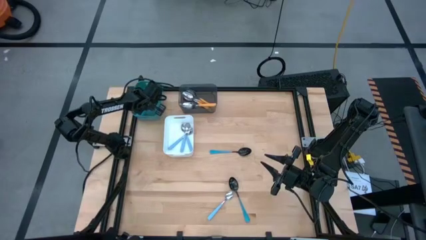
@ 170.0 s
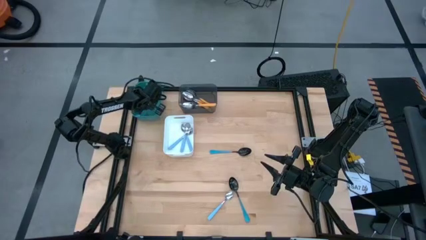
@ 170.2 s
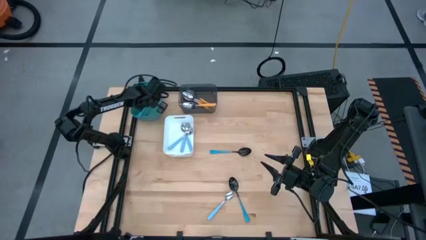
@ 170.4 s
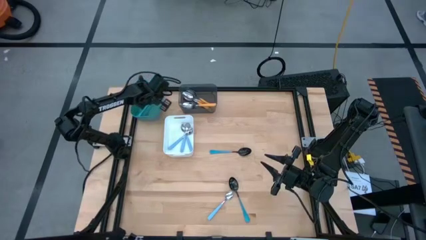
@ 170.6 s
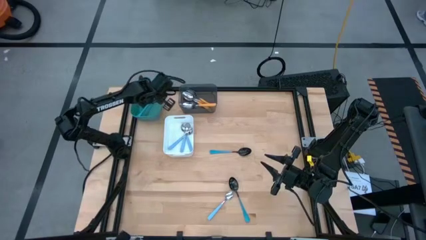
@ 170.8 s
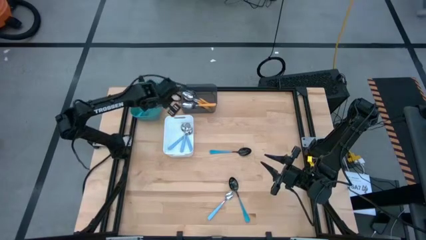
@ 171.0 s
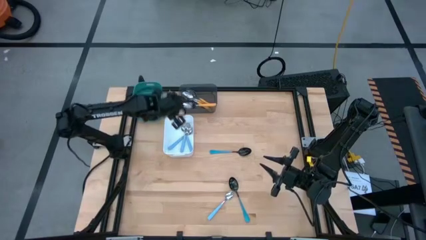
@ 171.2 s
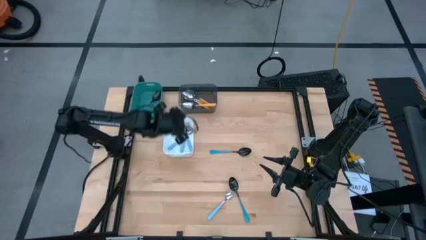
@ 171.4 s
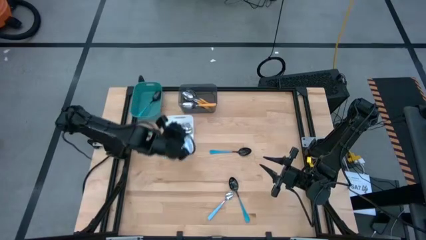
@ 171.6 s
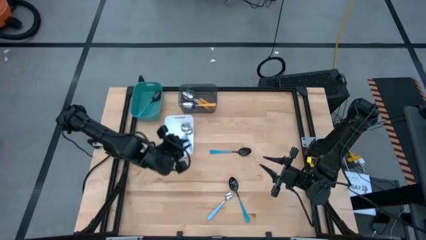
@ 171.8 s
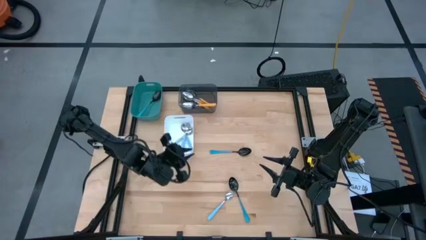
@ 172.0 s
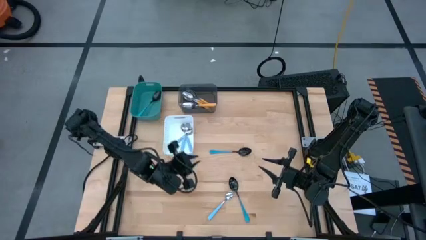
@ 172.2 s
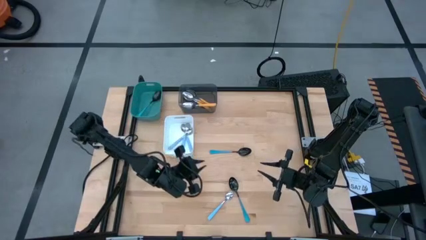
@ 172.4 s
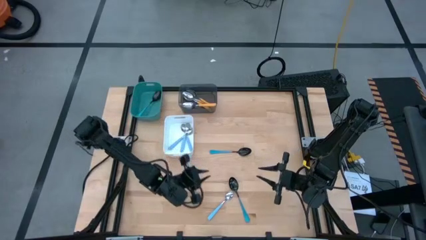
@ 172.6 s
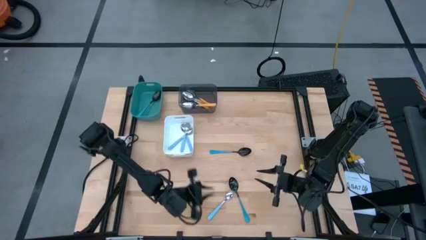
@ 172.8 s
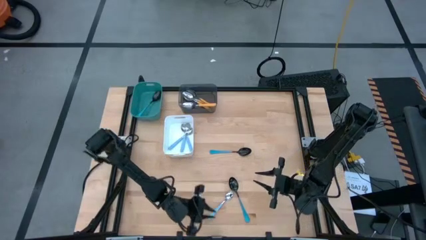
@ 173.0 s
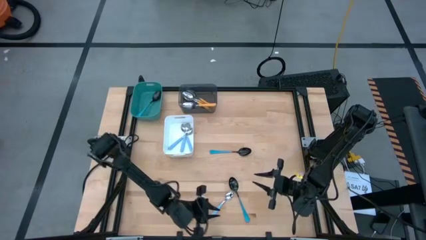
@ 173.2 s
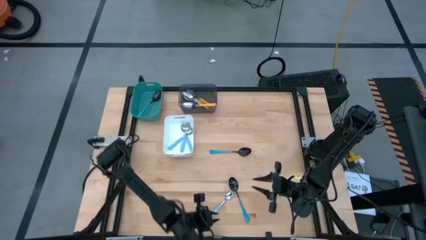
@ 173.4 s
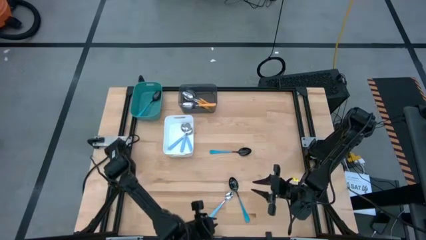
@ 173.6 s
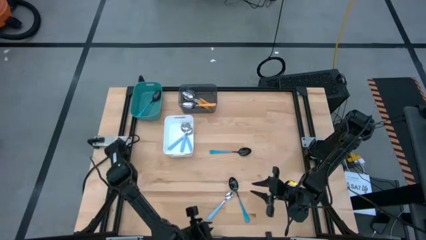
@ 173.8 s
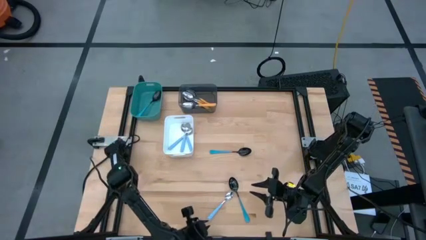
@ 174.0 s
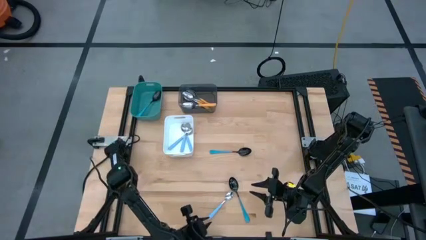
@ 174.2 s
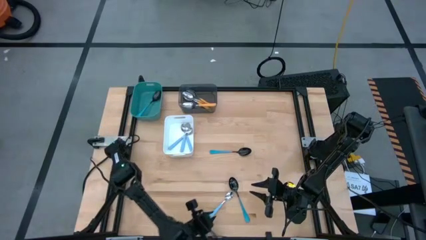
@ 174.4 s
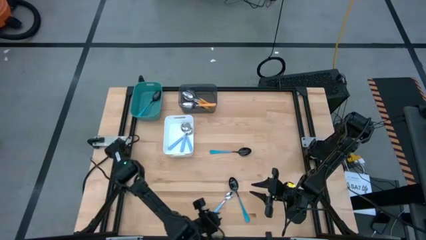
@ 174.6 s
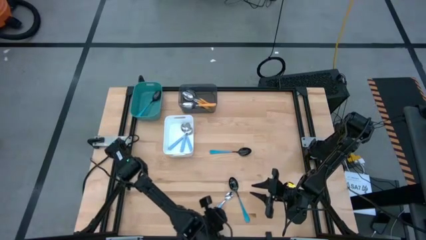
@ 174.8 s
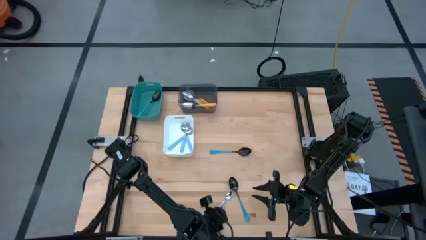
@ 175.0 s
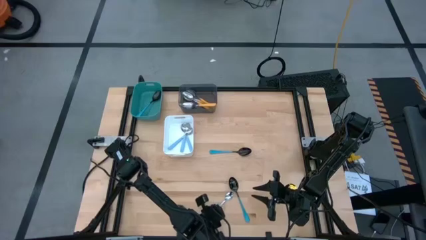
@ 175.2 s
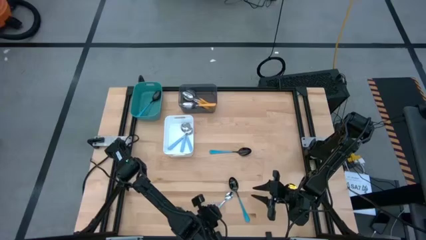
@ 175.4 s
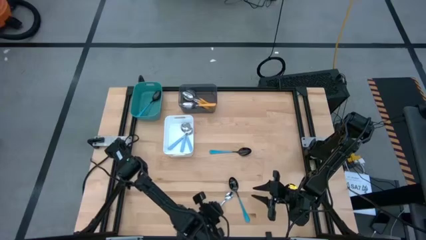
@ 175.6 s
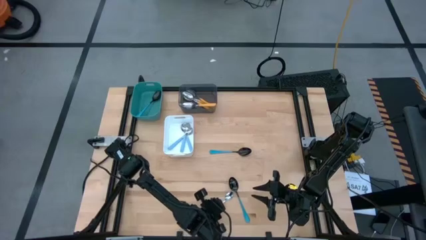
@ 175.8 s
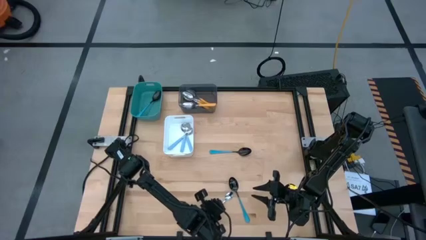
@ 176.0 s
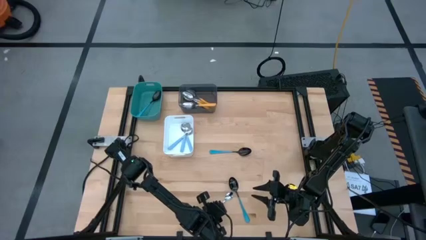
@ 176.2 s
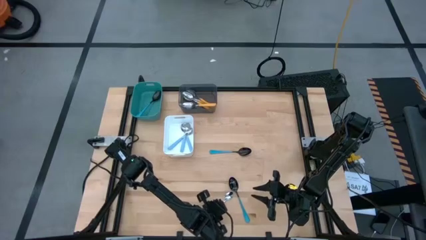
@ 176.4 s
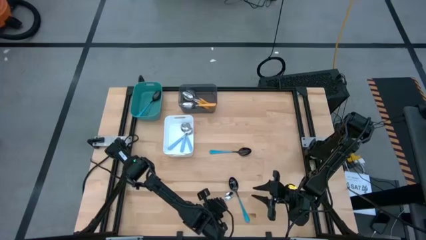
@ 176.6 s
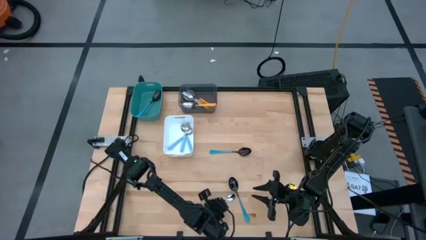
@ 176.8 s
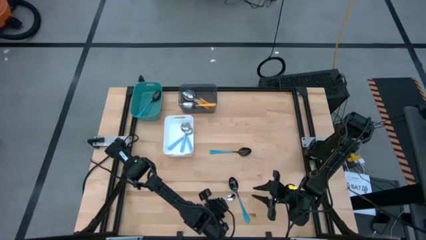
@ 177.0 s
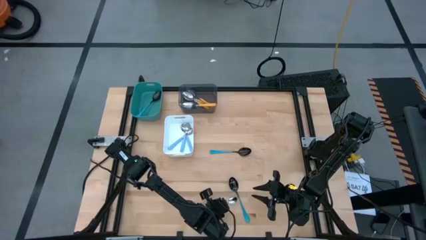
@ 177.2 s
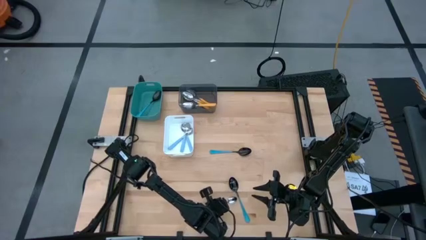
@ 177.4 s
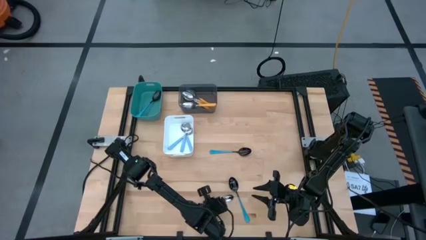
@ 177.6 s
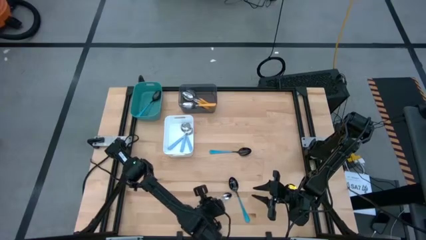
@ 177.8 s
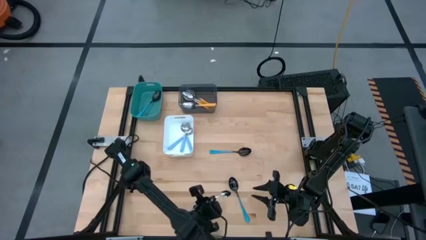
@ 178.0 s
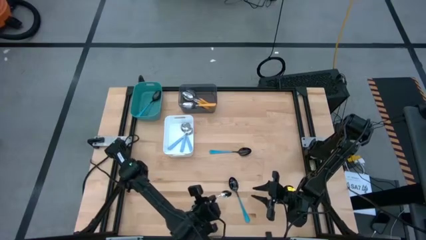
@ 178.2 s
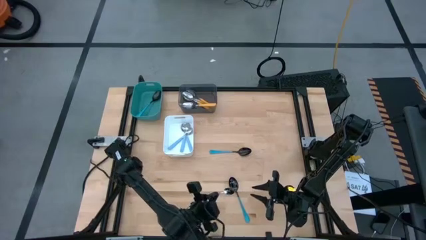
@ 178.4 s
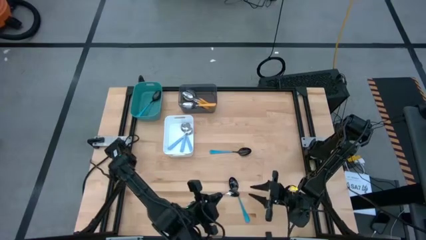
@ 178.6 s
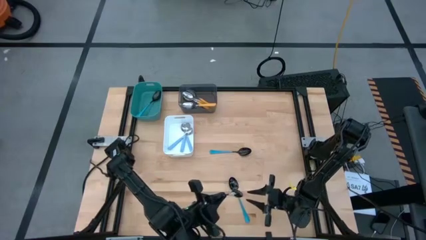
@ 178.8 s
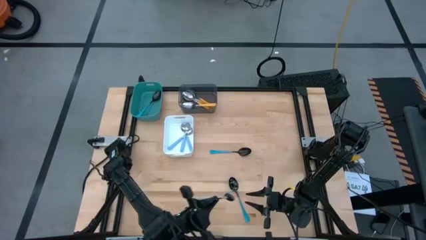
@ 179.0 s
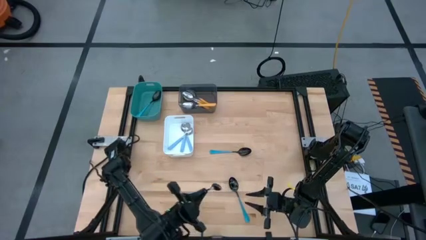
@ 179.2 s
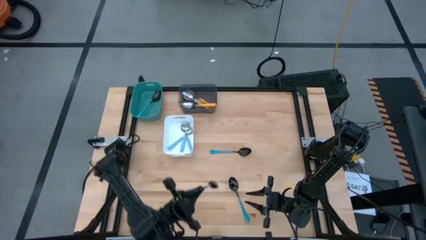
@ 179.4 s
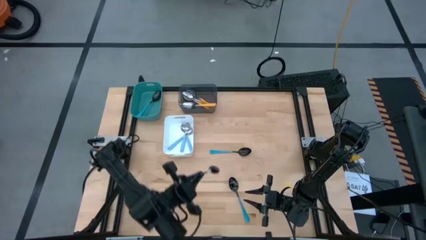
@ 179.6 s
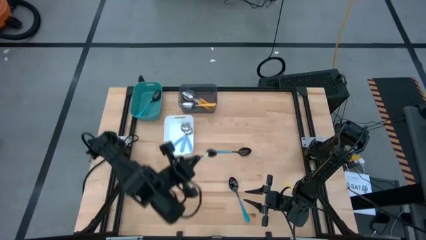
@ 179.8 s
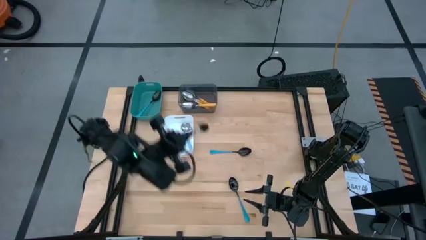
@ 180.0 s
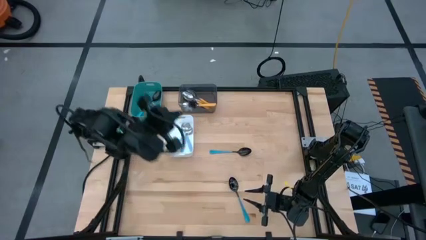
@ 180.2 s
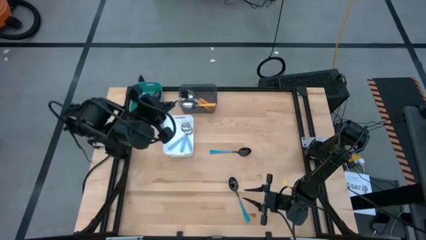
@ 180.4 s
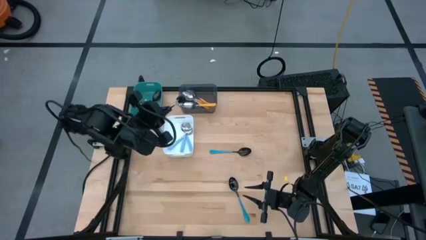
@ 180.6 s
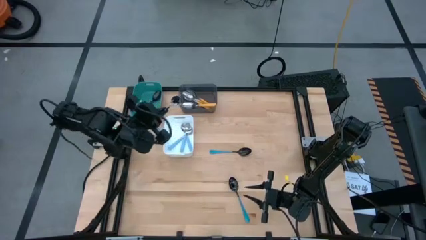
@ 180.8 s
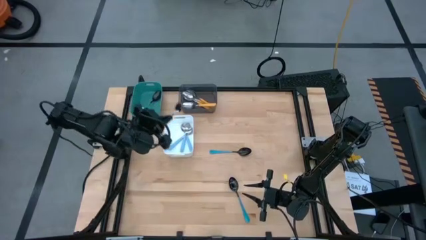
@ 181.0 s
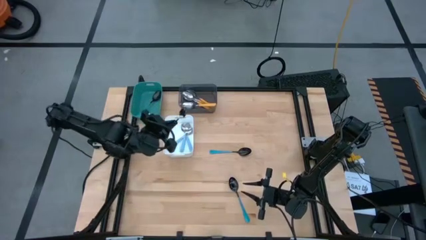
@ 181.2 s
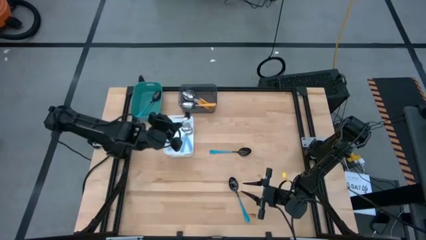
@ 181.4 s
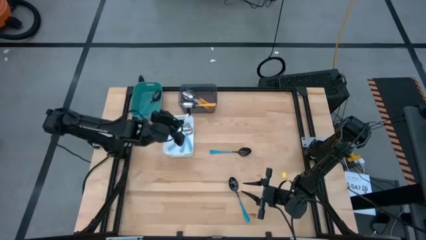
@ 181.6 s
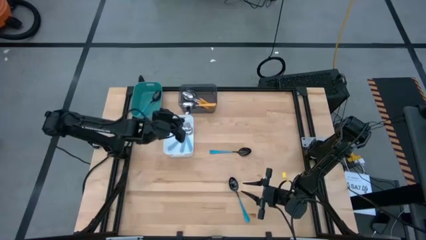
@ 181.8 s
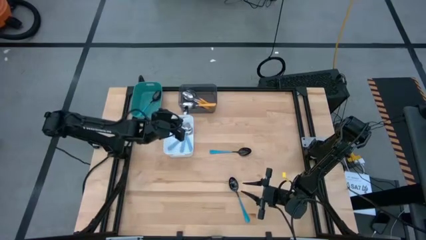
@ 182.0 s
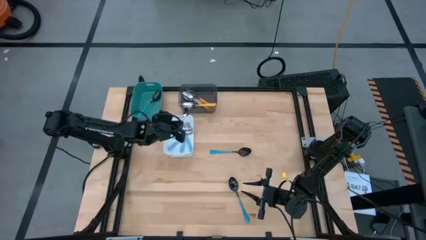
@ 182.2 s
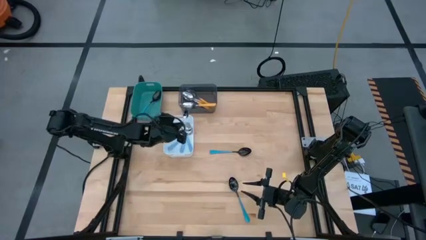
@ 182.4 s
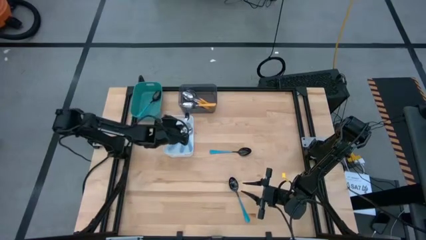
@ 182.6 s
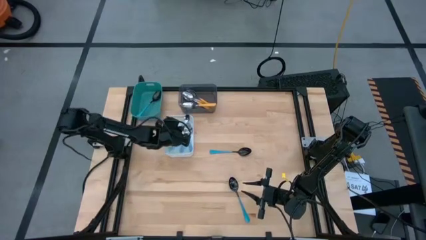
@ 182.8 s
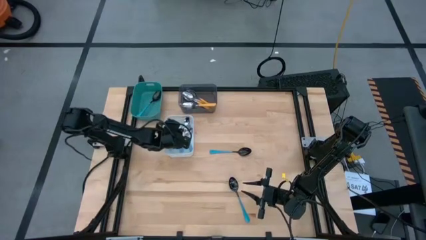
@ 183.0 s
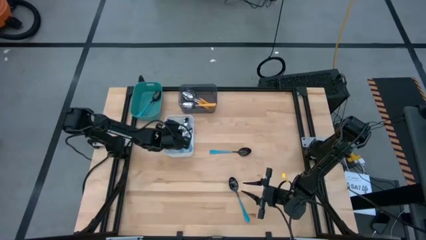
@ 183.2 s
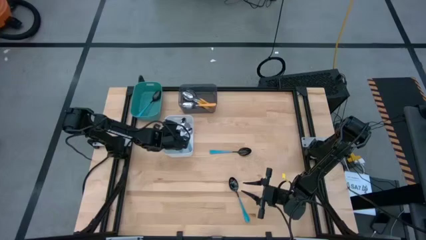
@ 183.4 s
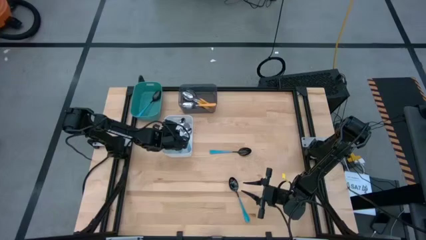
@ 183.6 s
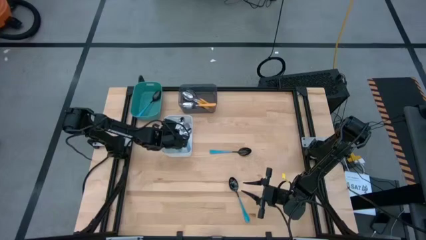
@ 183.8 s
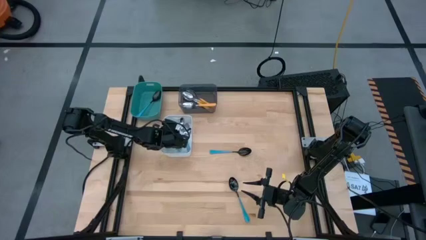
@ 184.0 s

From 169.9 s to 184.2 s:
Task: Sort silverware by color (type)
Put the light blue spoon into the white bin

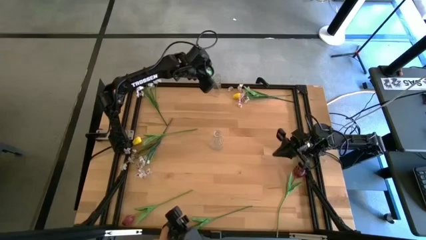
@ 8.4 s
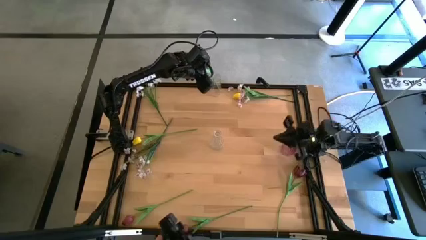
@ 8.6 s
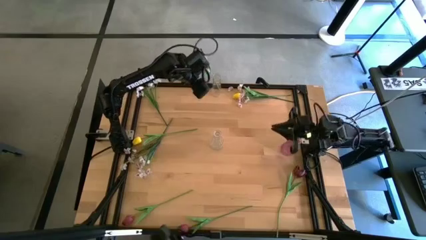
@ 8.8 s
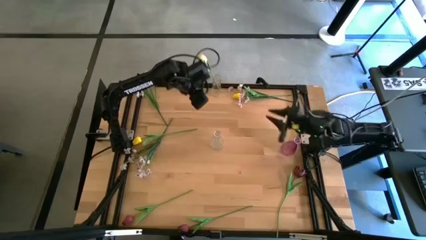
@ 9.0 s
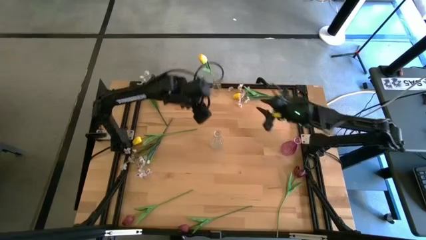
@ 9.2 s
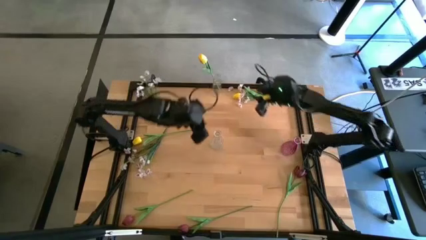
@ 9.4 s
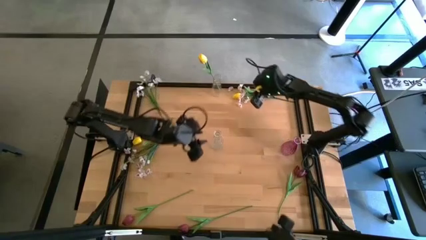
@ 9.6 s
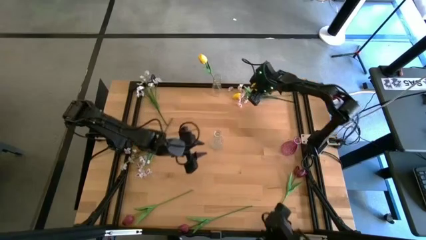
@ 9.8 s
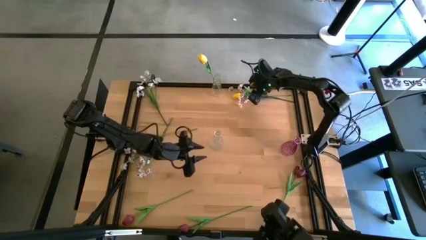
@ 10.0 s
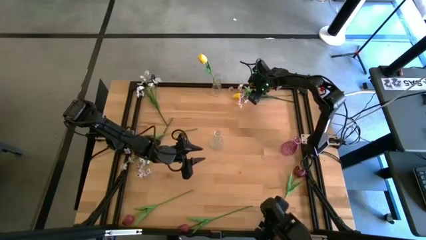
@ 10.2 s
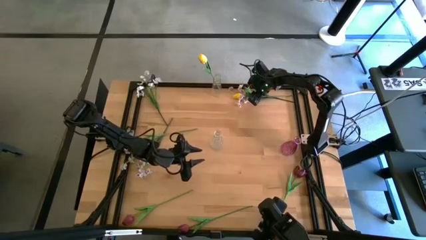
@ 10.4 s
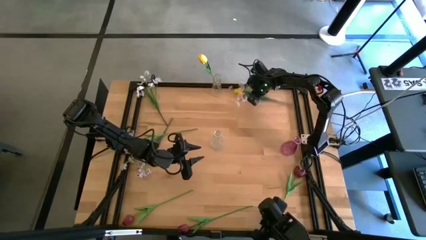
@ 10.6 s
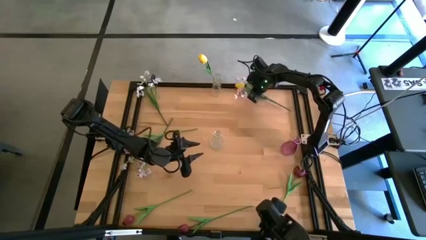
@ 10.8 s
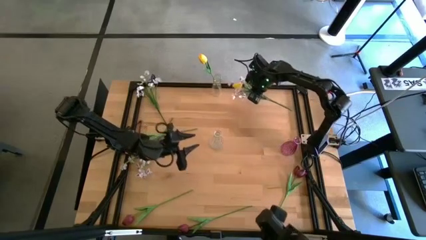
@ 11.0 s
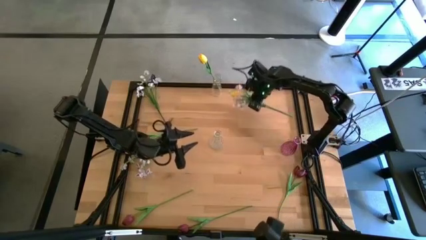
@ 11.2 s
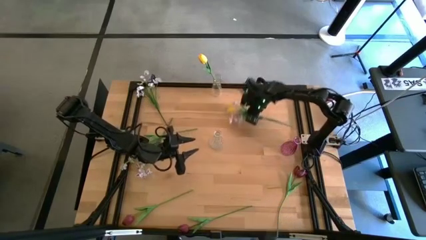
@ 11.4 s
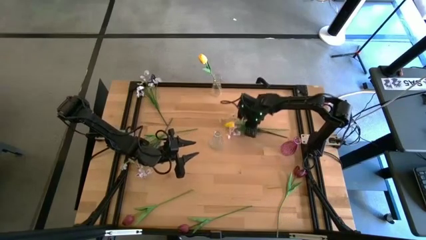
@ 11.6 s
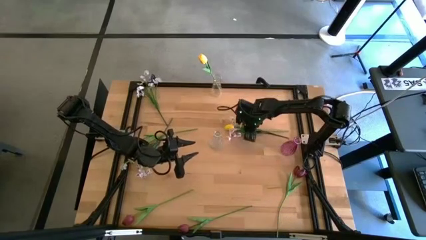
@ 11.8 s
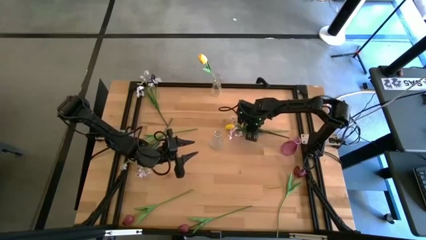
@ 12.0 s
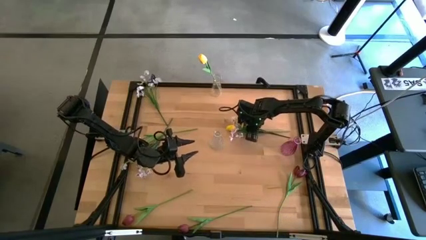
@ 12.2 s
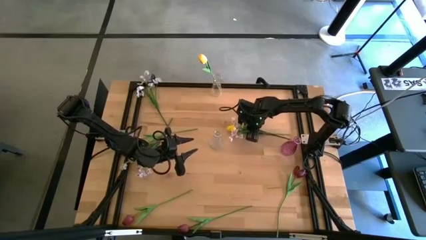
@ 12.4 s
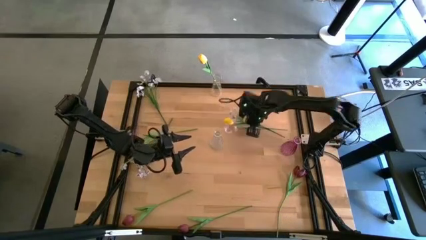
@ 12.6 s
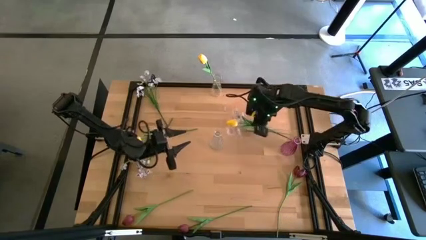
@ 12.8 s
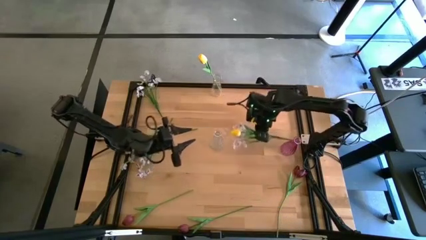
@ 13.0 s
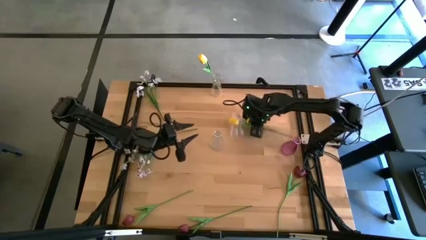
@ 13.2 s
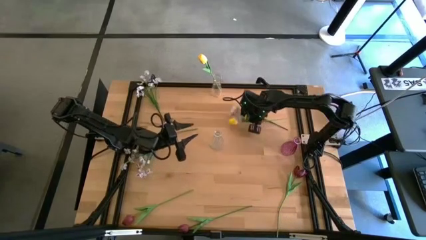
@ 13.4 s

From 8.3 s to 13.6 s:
Task: Sort flowers into vase by color
Put the top yellow flower into the top vase
